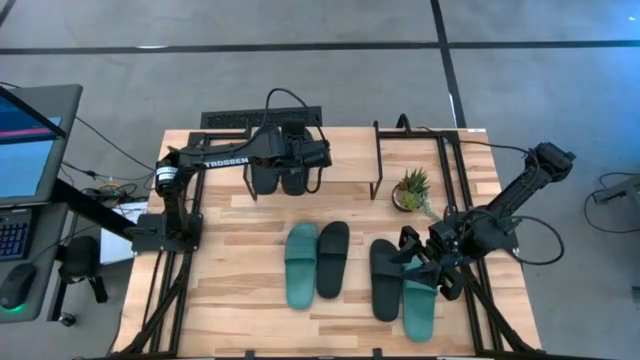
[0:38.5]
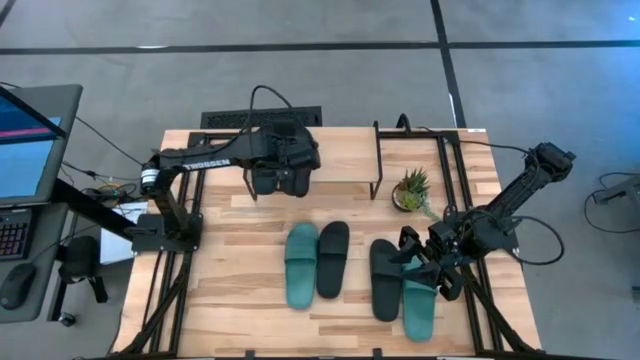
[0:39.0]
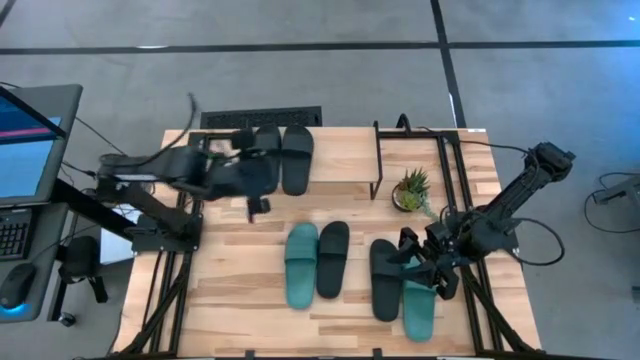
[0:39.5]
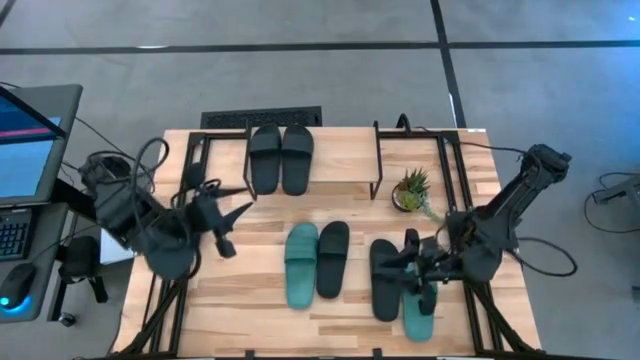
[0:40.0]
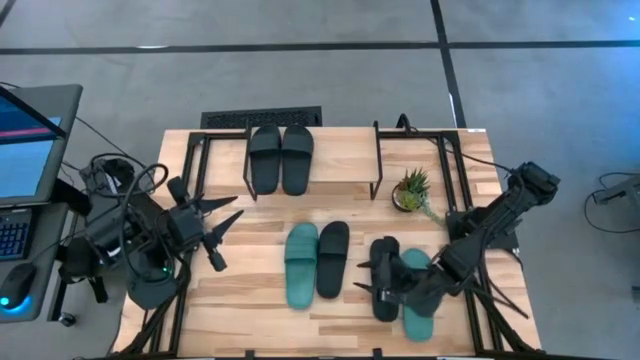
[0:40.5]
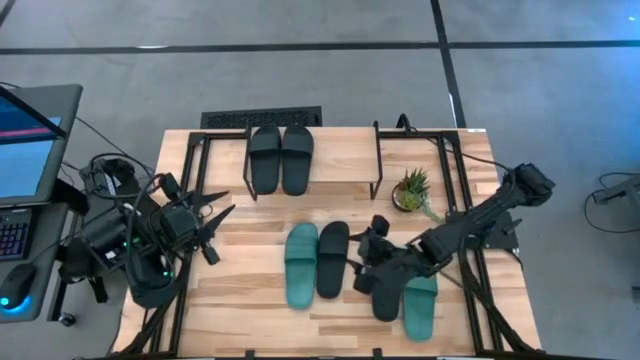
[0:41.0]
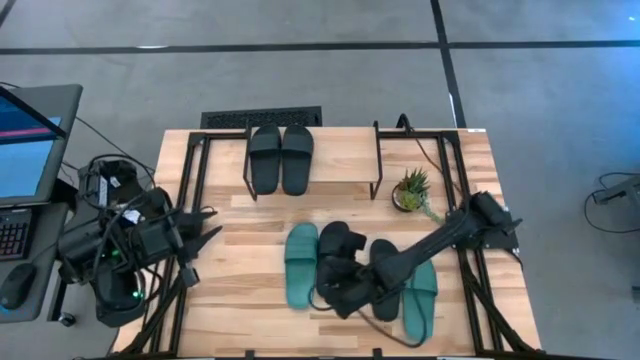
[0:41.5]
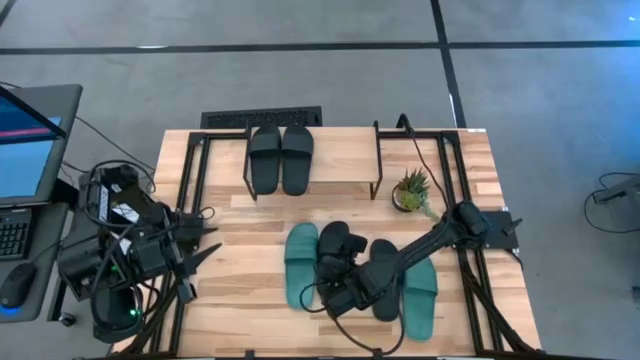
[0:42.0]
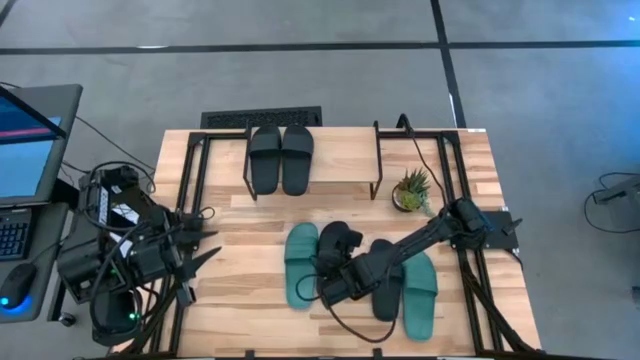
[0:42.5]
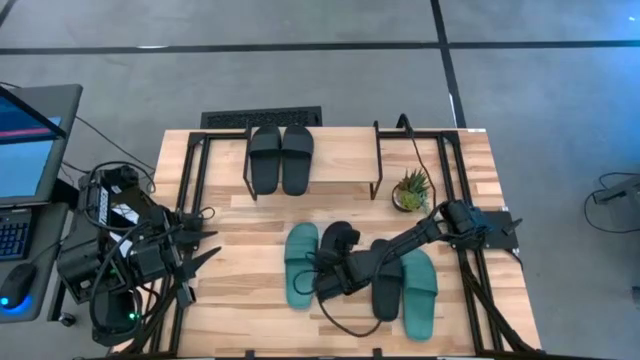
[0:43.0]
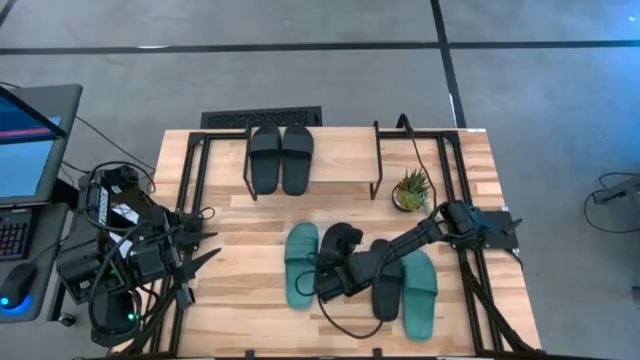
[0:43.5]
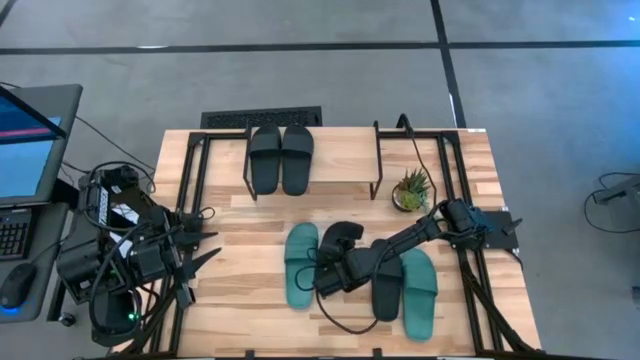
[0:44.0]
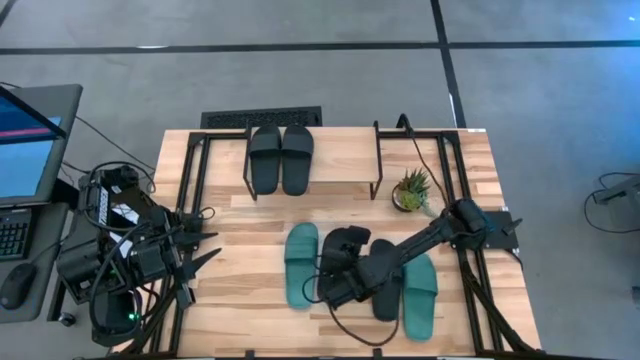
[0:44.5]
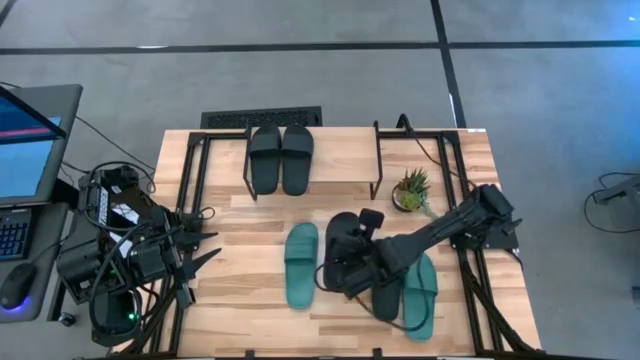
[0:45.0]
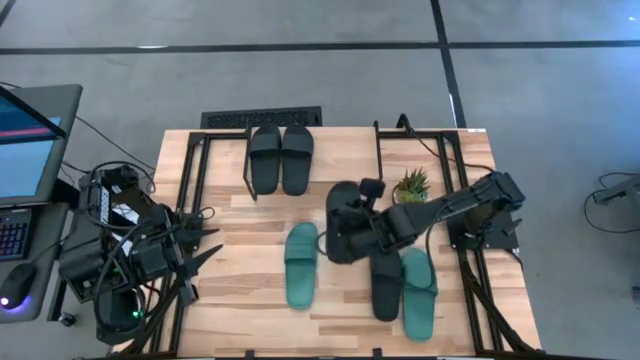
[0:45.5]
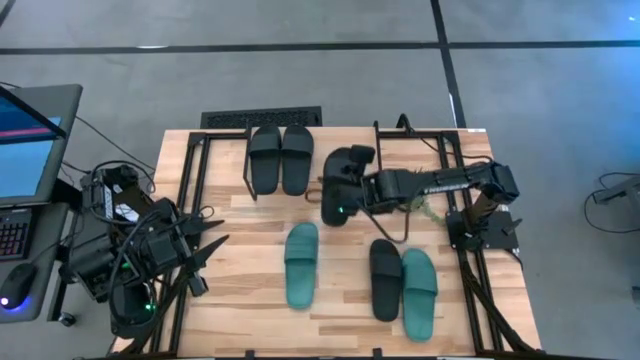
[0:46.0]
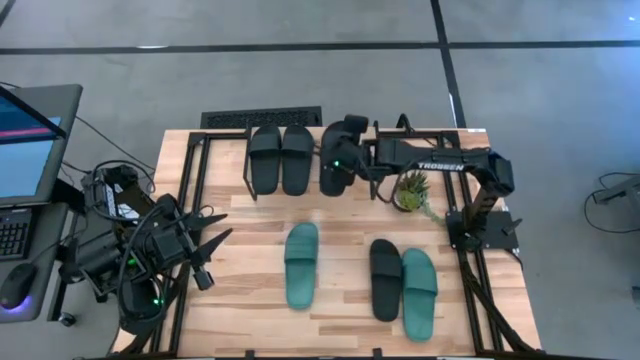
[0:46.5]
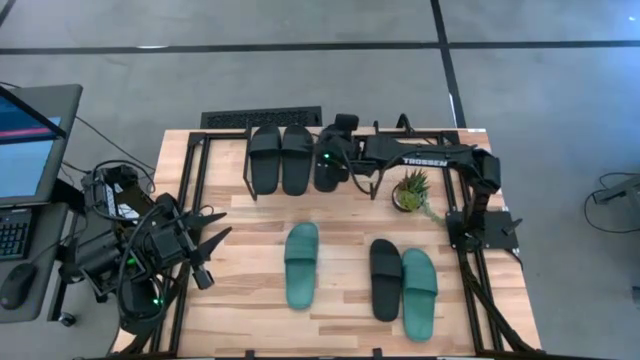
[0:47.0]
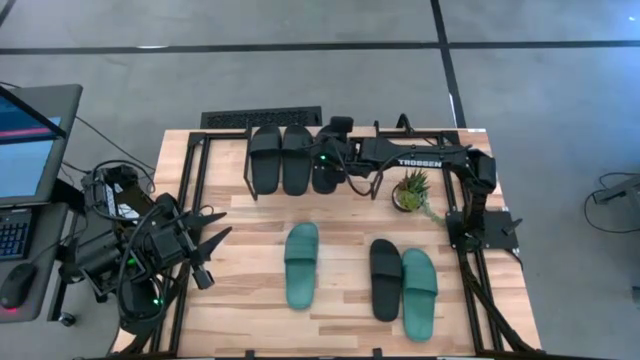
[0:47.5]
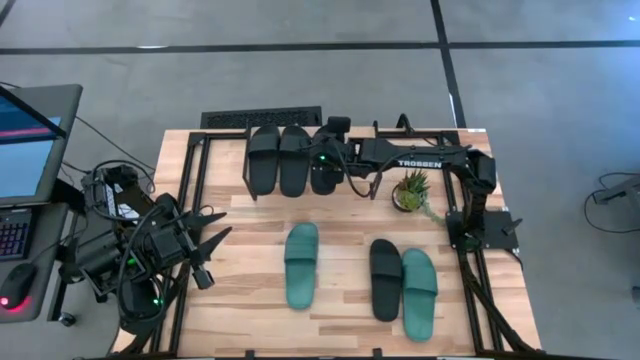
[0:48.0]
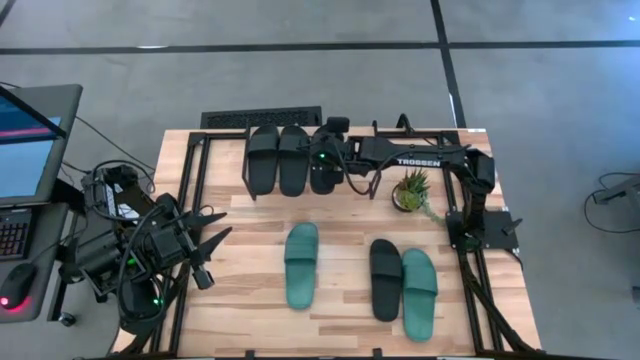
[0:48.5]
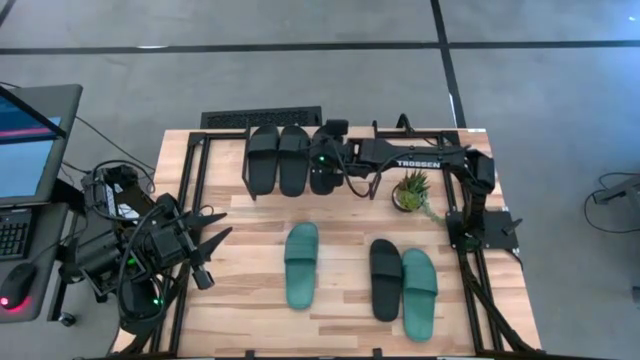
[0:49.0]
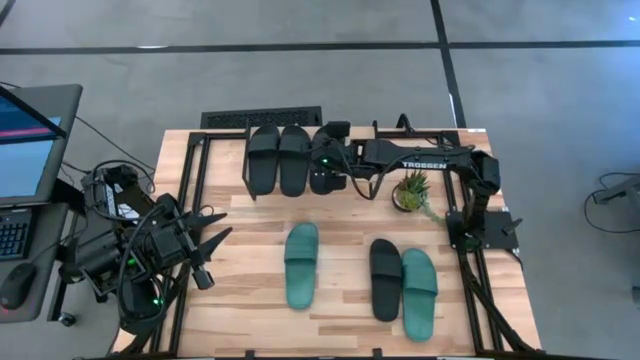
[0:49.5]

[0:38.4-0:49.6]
Task: Pick and place slides into the shelf
Put the black slipper on the shelf

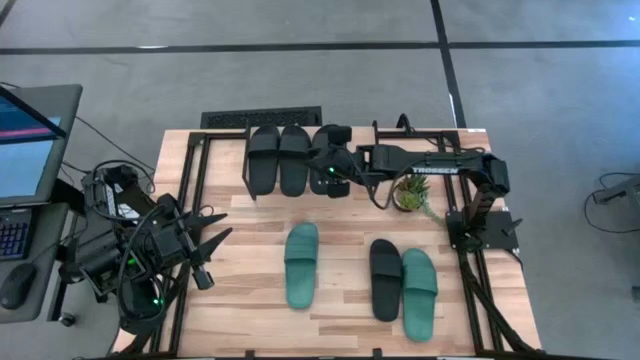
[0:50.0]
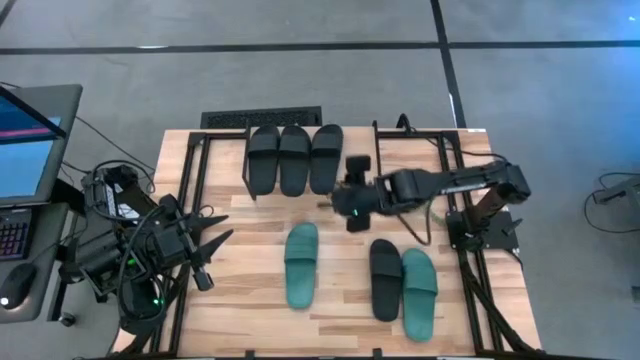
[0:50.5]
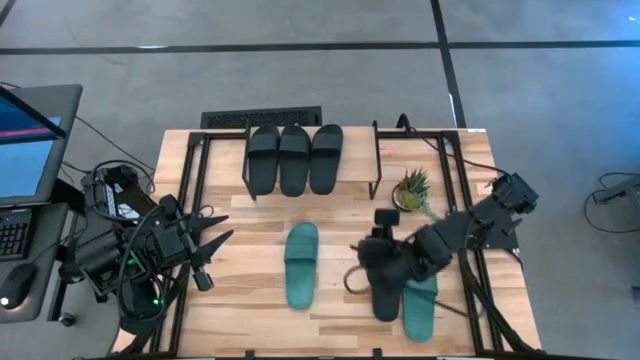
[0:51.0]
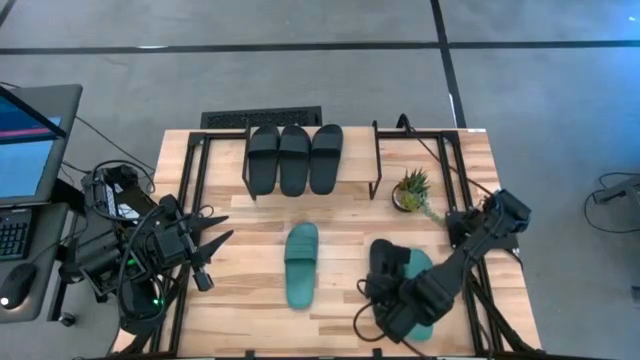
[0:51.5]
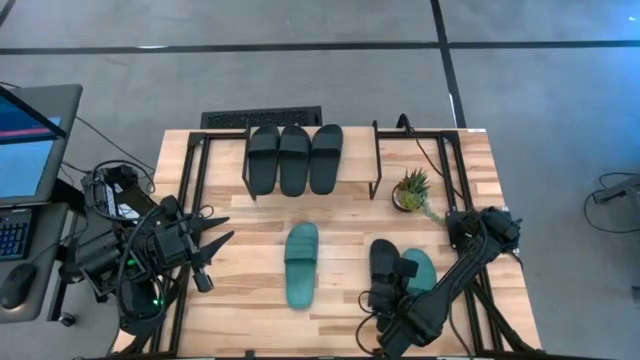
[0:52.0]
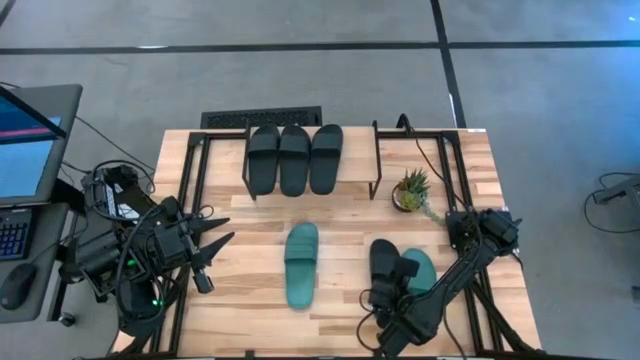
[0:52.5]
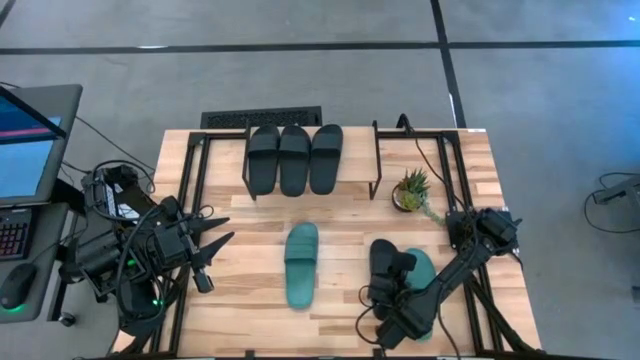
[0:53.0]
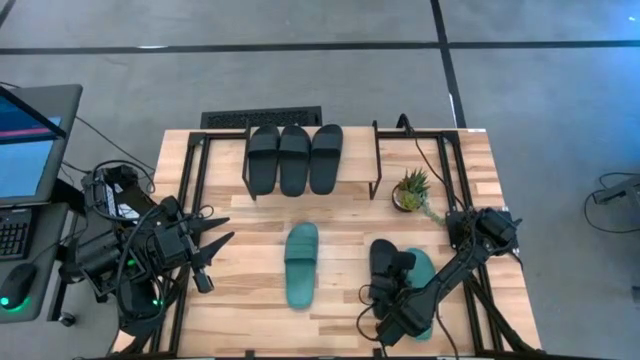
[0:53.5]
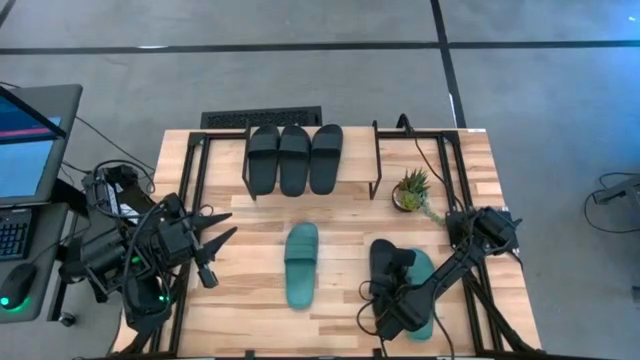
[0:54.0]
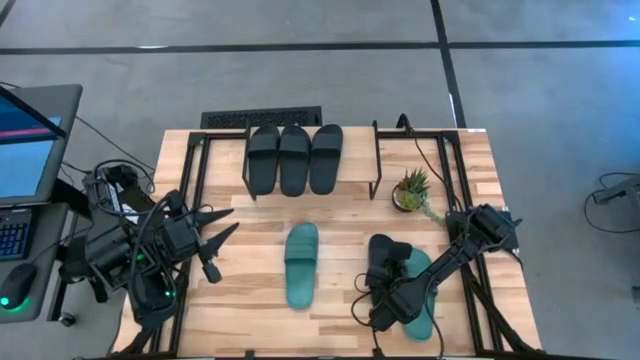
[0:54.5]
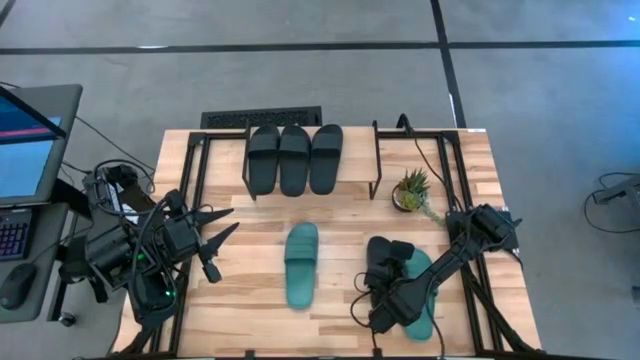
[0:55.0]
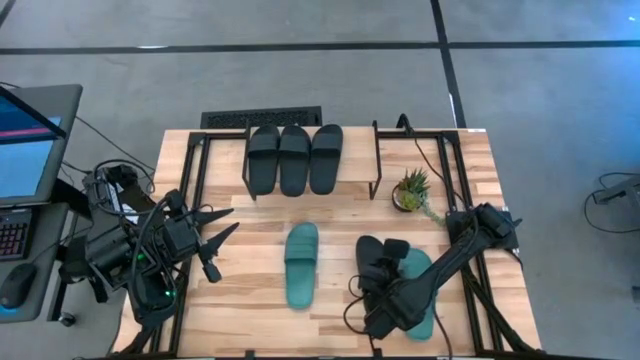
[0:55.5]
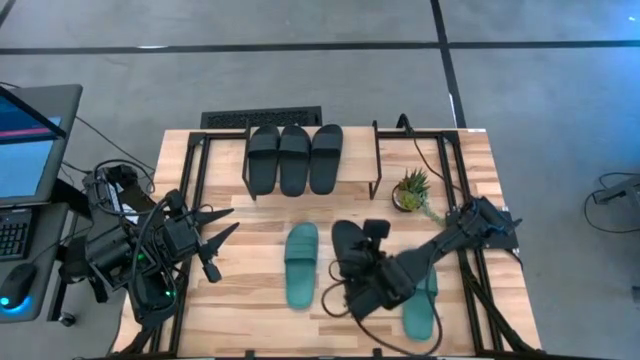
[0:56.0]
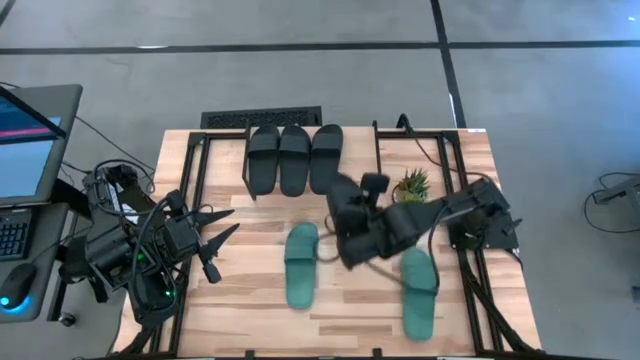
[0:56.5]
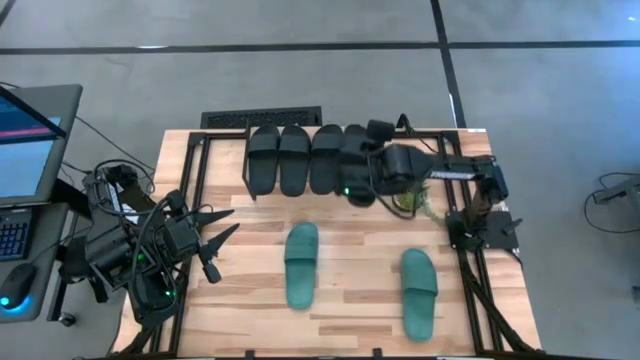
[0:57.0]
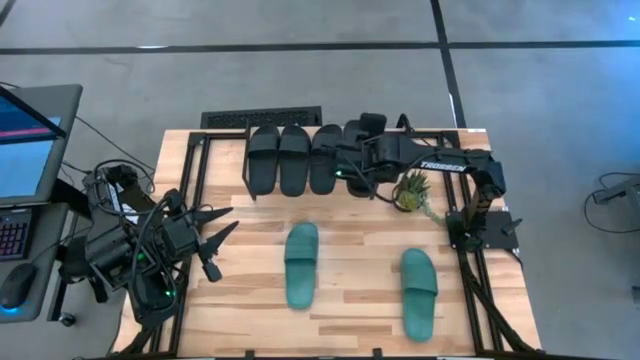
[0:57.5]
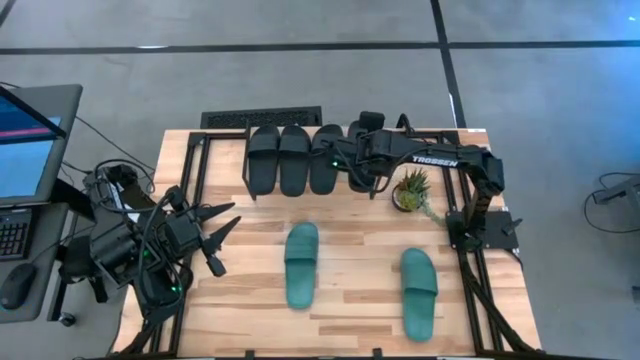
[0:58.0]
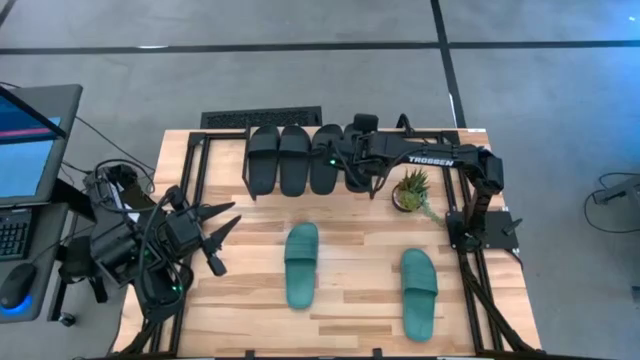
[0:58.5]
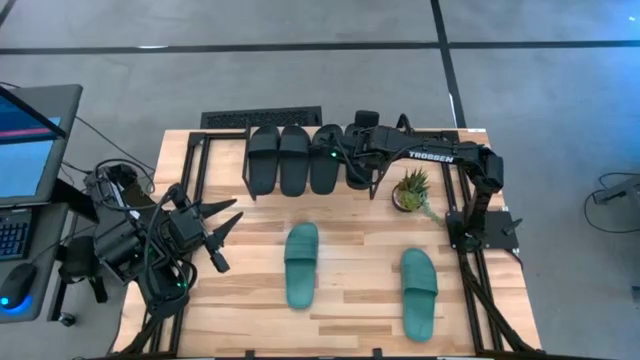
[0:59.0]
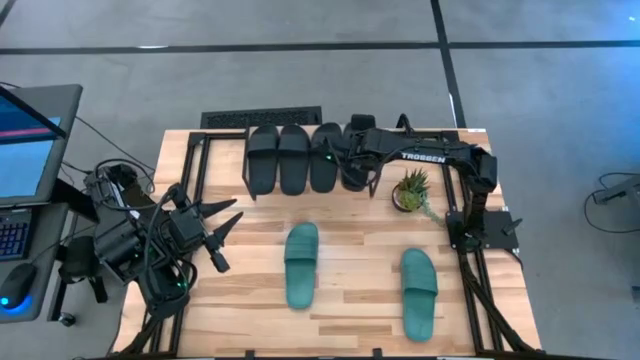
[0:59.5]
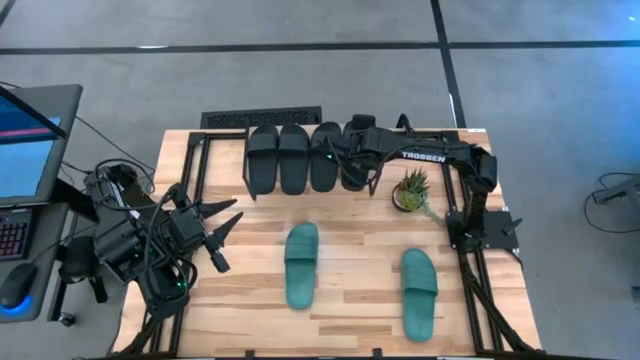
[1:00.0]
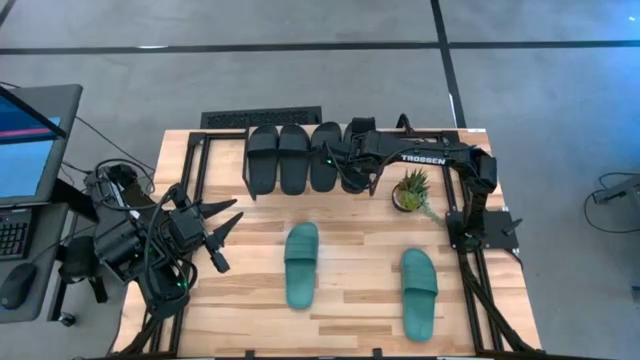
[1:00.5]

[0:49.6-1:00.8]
Put the black slipper on the shelf
